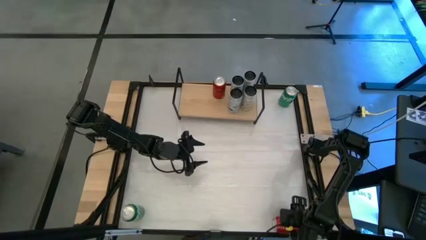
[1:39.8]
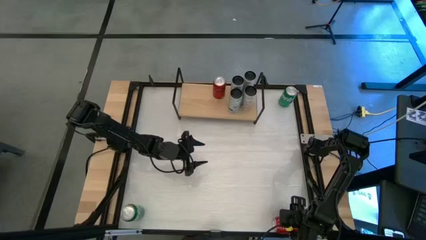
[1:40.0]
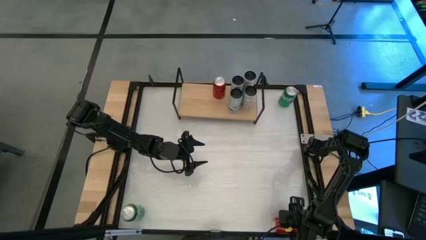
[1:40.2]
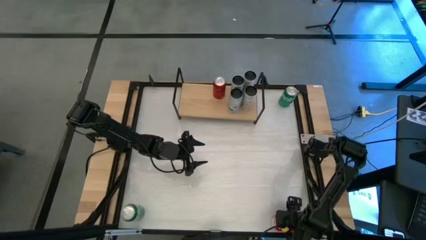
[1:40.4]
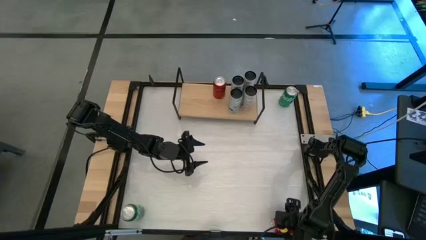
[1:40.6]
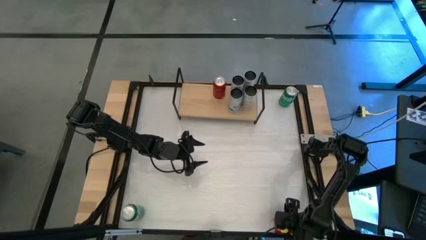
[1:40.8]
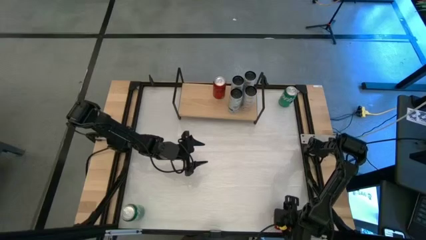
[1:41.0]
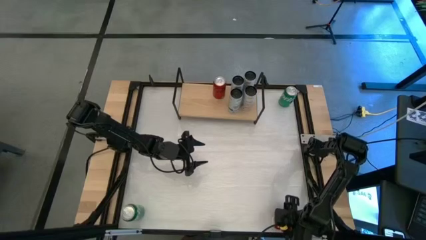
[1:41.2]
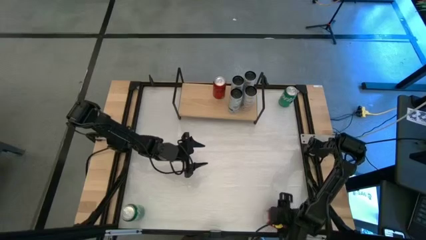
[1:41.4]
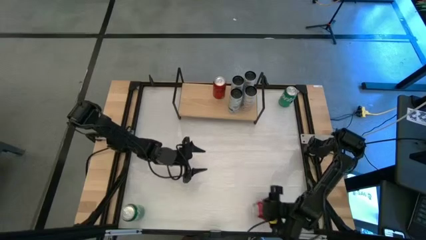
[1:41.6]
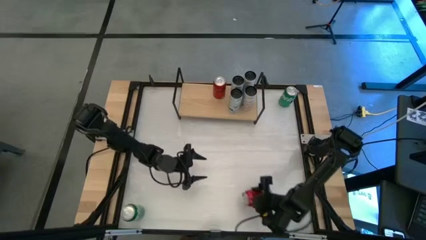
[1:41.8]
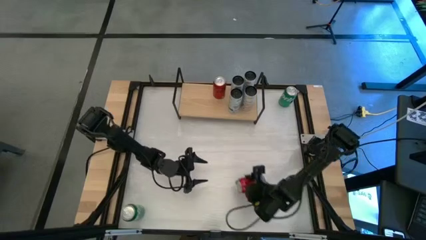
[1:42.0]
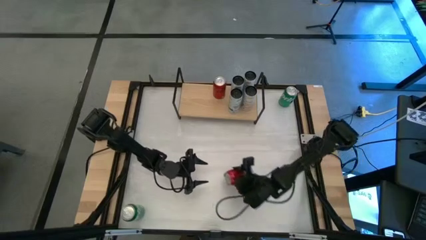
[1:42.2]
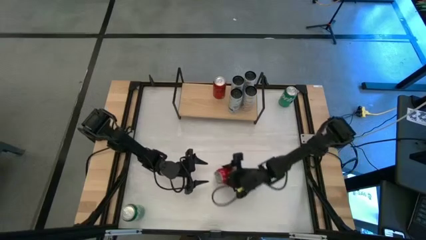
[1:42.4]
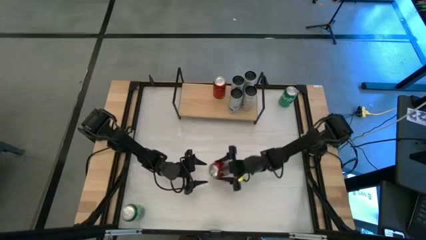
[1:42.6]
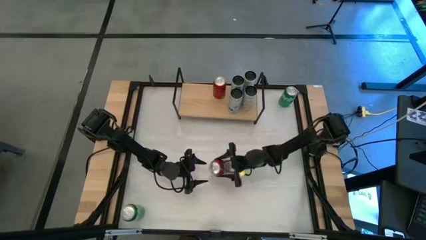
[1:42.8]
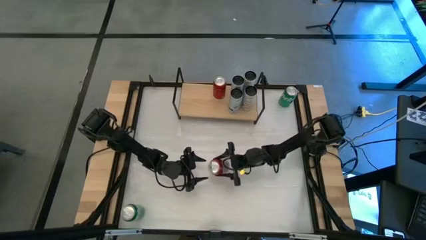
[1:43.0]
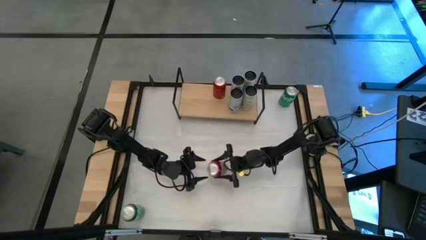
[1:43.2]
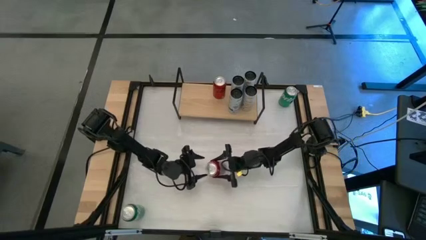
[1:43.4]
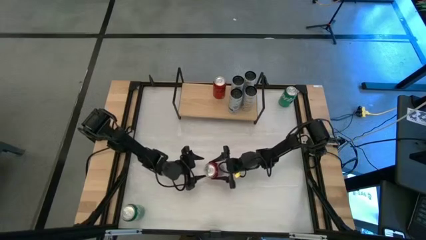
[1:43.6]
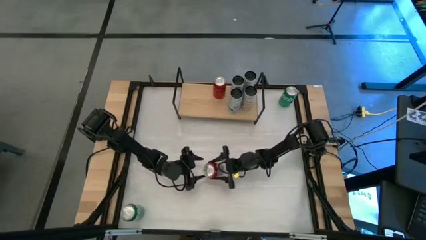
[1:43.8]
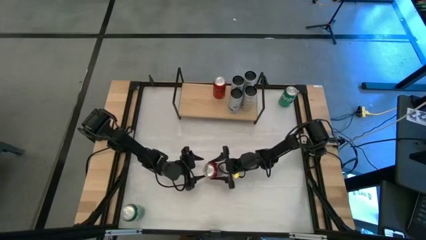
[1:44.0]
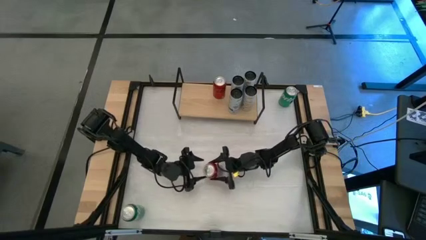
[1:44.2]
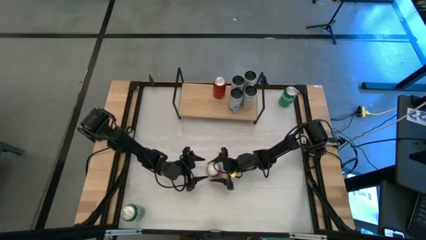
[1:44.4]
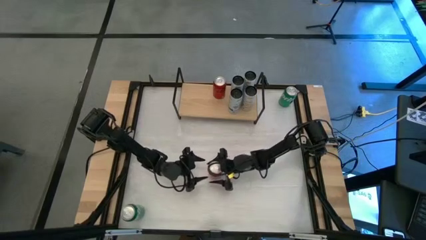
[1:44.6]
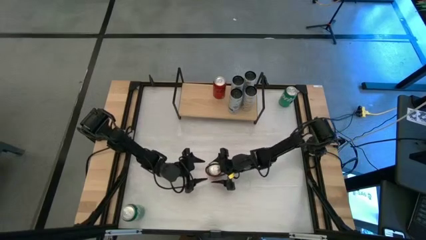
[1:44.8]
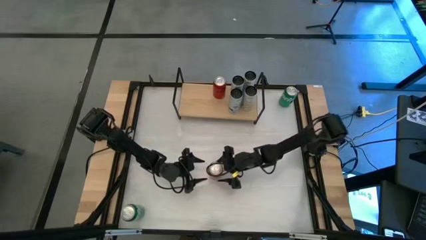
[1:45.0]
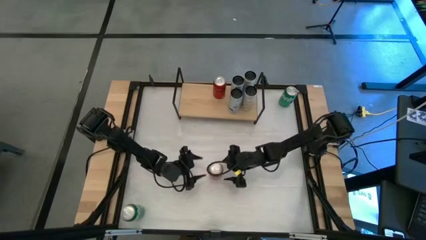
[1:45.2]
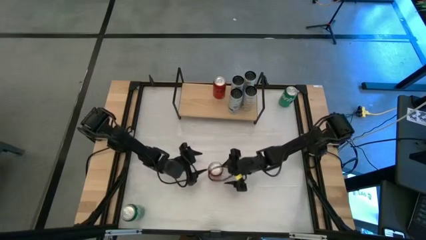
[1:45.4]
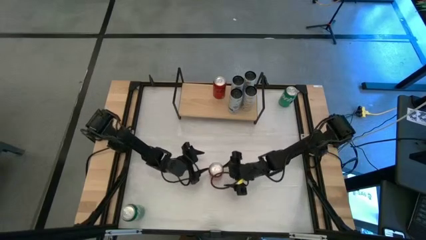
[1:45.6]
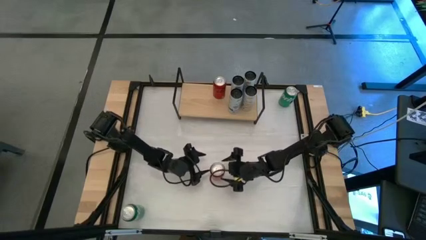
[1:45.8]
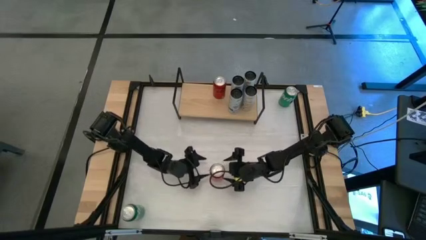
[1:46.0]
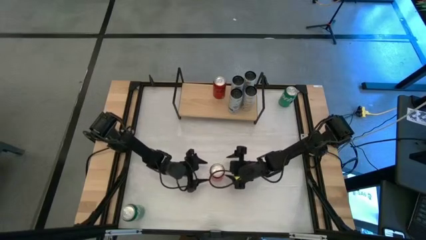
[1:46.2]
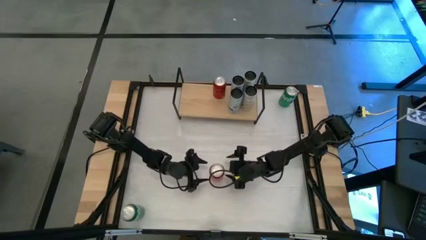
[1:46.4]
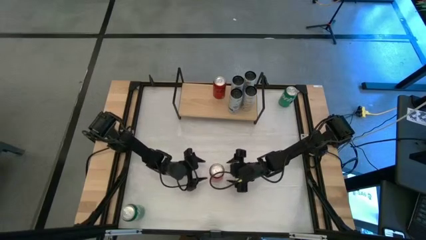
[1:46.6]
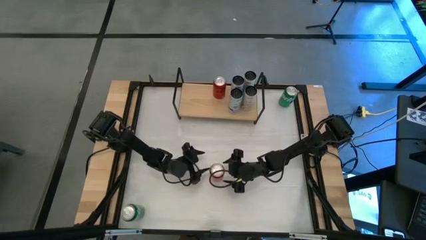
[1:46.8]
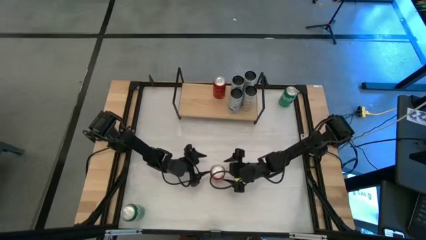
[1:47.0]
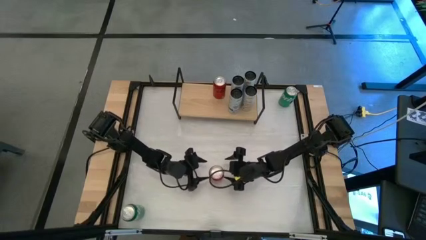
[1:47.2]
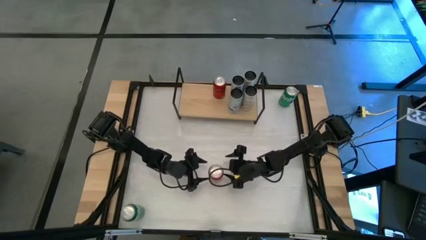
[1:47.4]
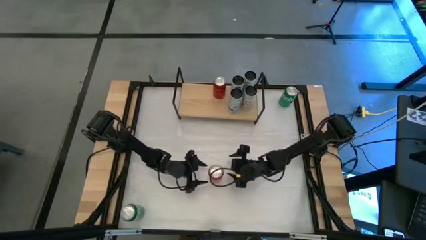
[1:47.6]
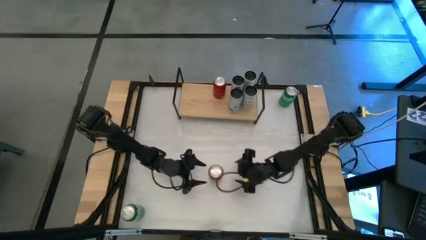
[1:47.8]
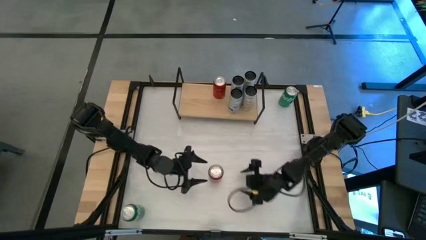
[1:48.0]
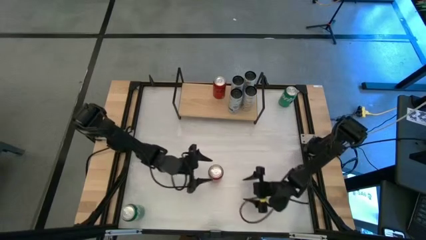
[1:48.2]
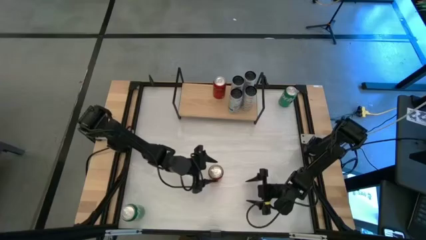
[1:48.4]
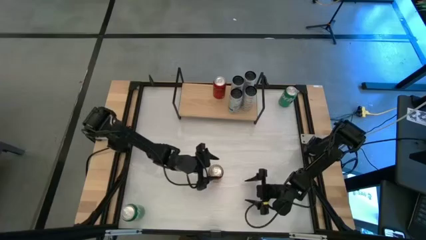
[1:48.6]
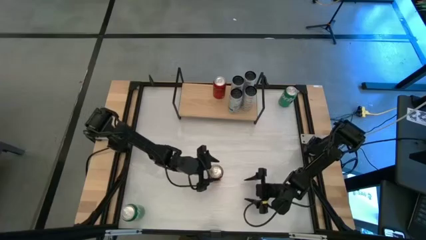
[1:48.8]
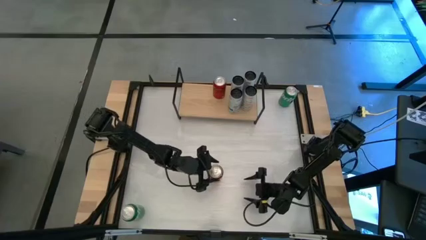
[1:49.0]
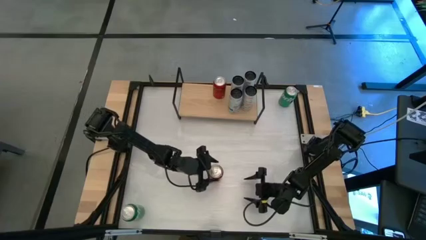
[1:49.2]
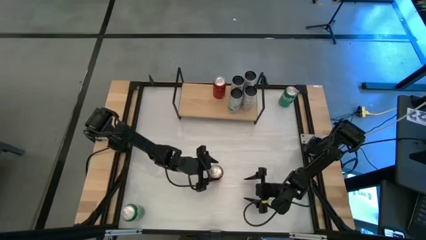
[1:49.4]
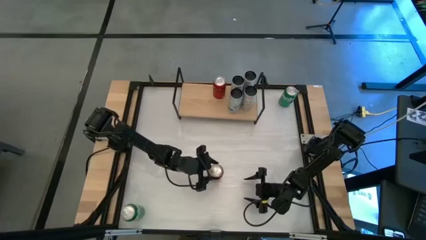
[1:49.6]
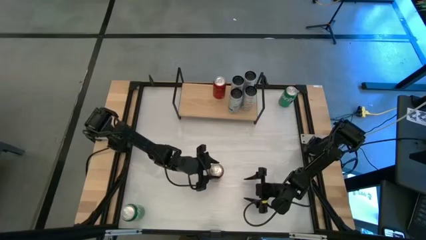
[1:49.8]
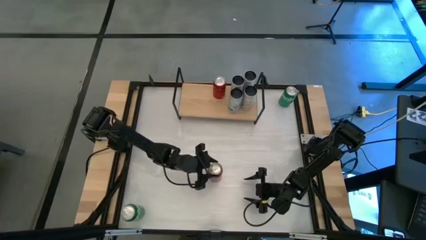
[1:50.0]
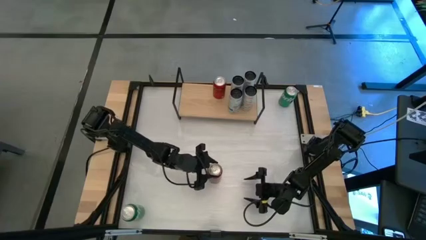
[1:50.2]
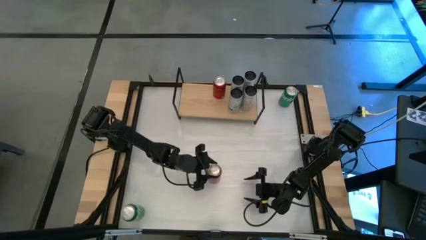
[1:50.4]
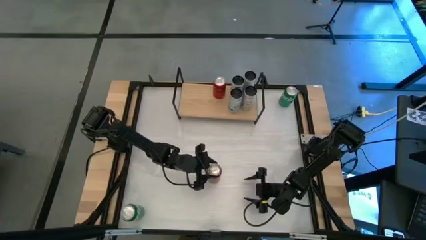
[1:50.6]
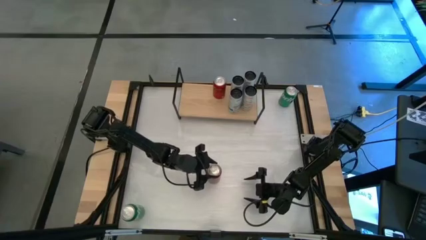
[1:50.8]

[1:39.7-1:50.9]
Task: Place canned beverage on shelf
Put the red soda can on the shelf aligned with the other red soda can

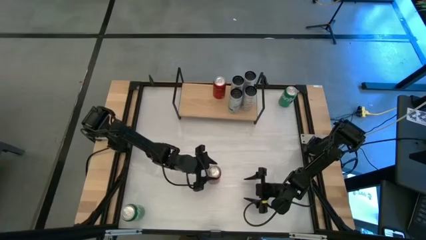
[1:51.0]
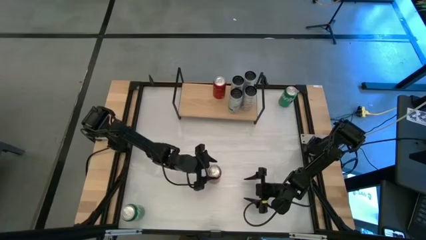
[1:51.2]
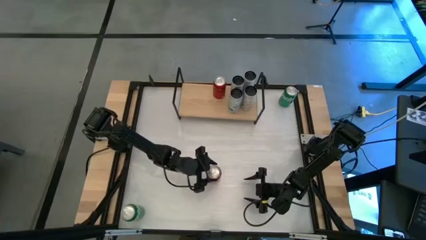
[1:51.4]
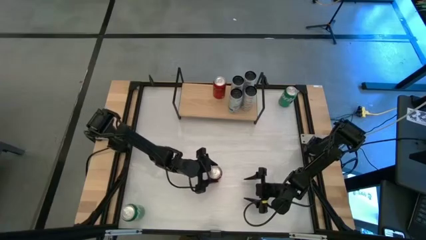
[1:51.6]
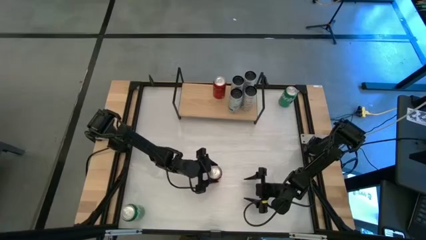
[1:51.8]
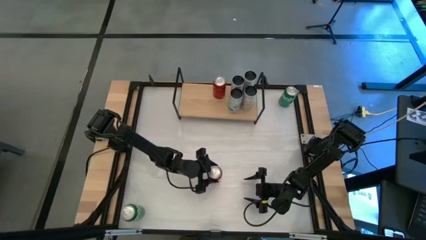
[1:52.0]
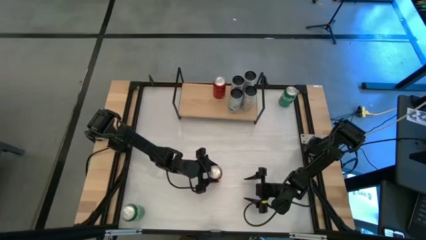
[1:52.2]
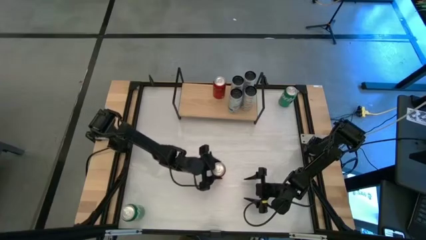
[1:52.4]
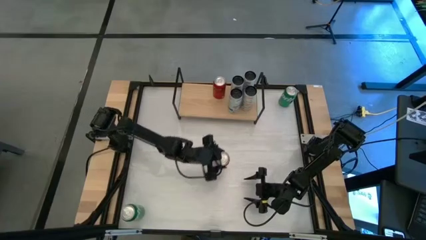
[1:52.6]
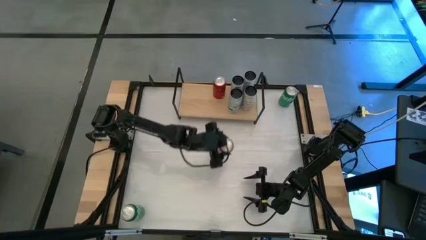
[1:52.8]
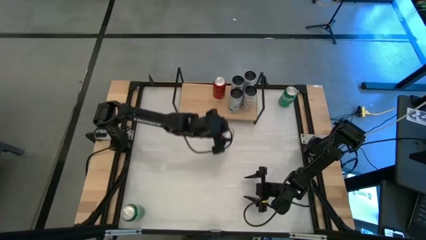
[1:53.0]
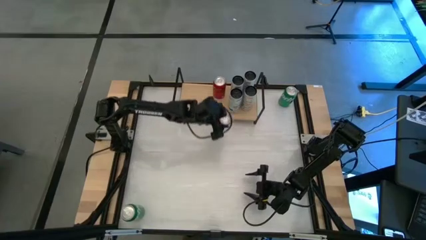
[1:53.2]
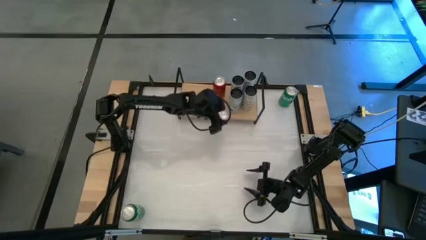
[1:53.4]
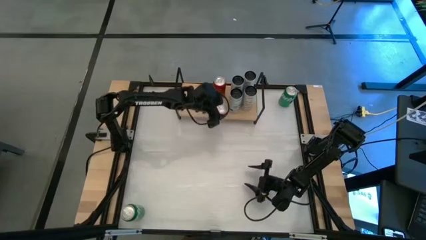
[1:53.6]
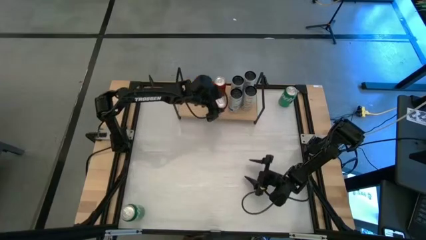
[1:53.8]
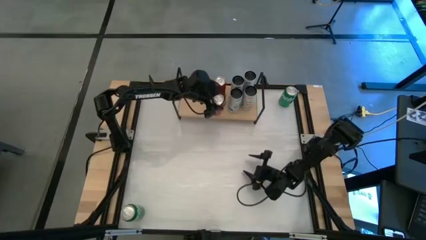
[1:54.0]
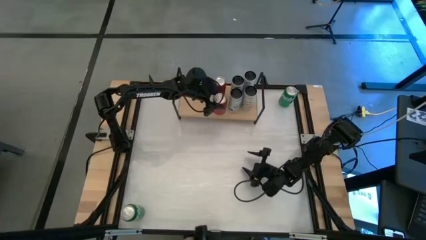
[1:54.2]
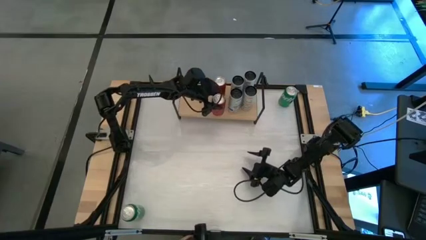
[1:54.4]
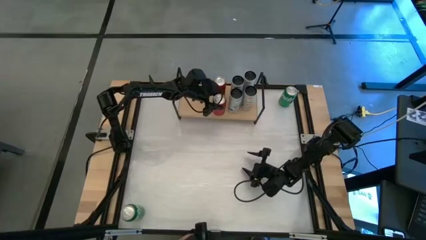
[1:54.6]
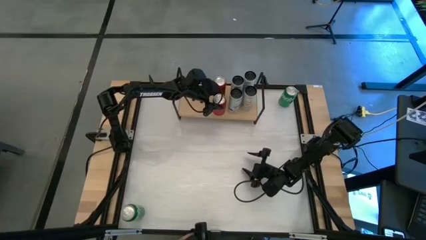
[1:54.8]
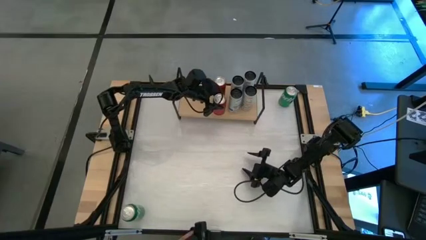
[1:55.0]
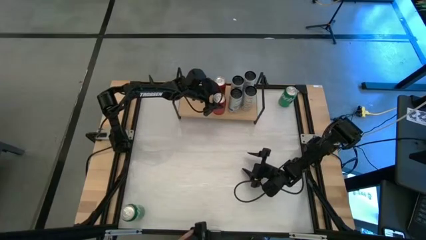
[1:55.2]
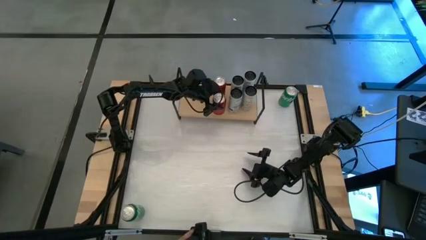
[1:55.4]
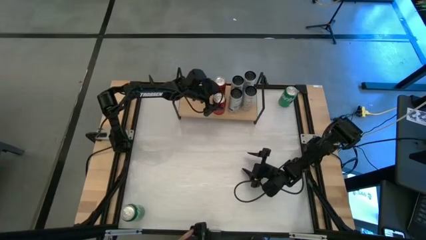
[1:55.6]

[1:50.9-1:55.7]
Put the red soda can on the shelf aligned with the other red soda can
